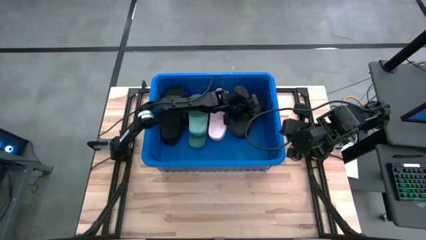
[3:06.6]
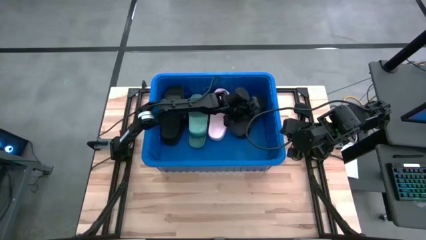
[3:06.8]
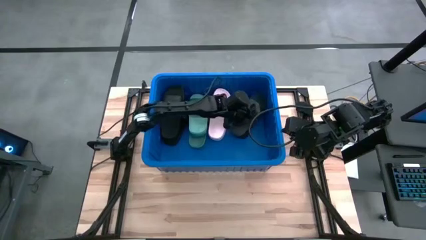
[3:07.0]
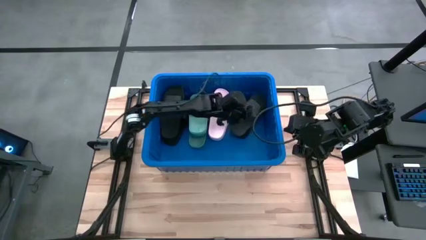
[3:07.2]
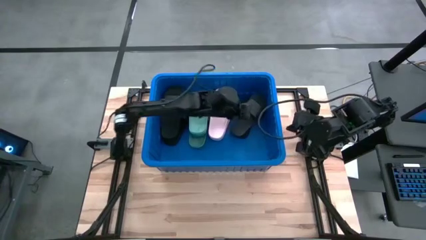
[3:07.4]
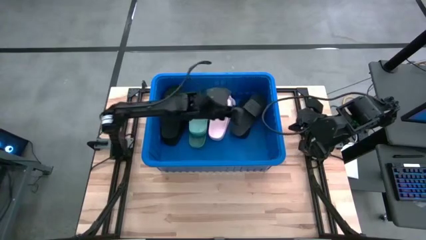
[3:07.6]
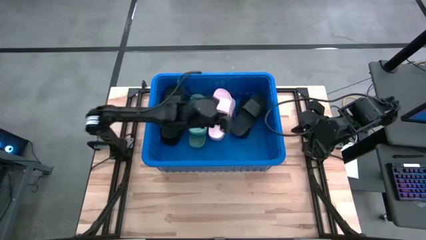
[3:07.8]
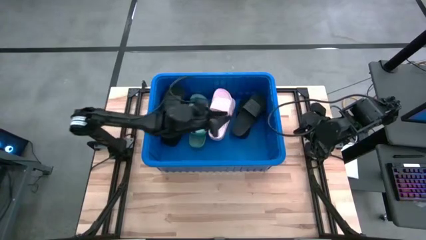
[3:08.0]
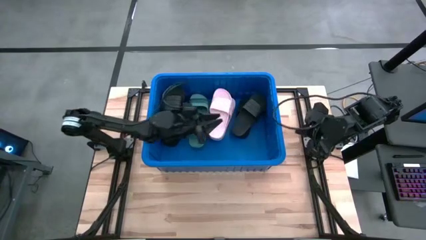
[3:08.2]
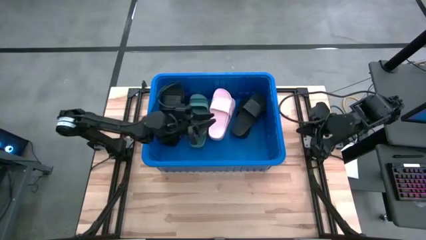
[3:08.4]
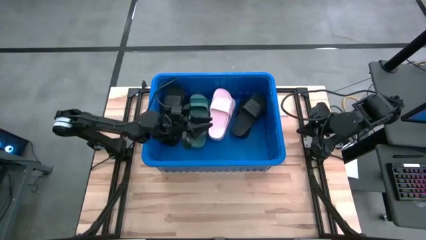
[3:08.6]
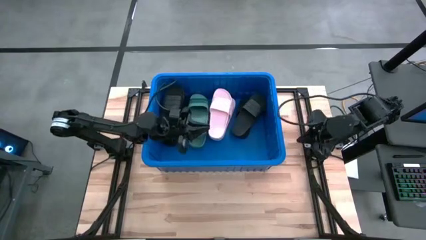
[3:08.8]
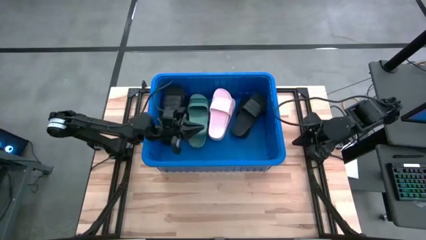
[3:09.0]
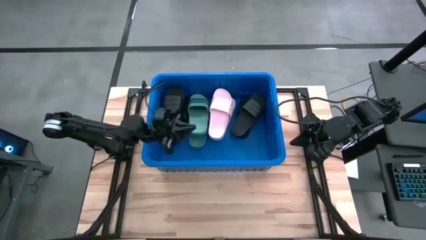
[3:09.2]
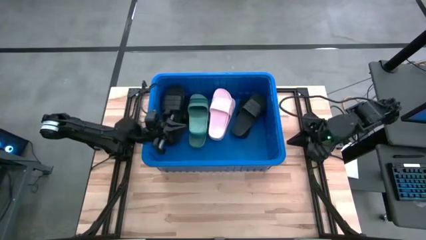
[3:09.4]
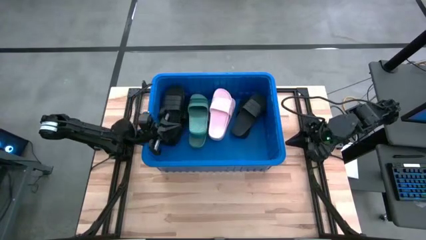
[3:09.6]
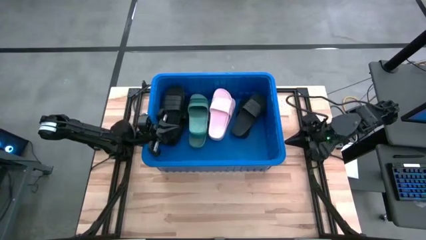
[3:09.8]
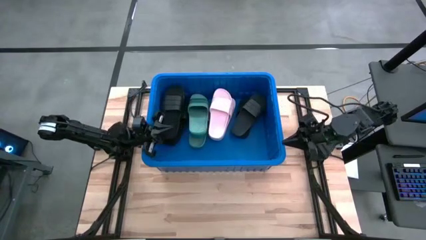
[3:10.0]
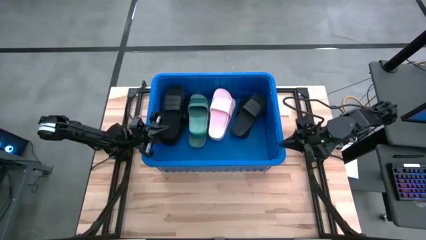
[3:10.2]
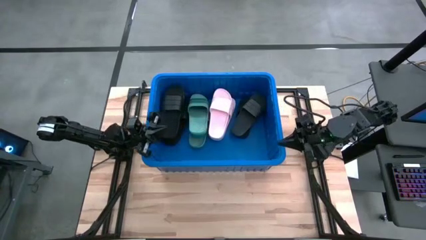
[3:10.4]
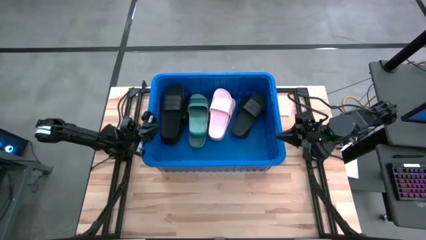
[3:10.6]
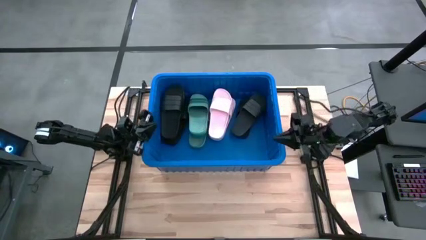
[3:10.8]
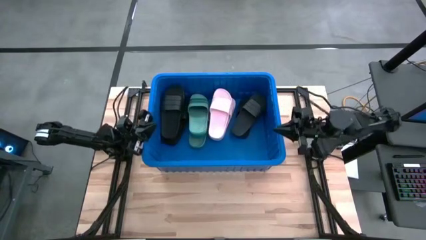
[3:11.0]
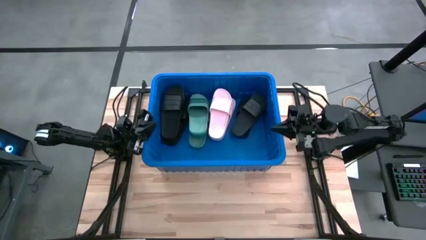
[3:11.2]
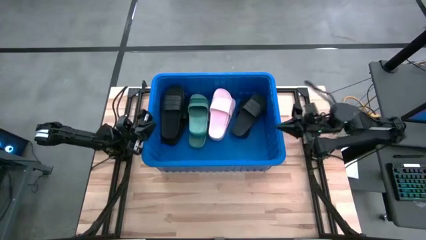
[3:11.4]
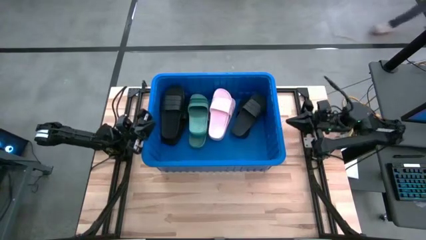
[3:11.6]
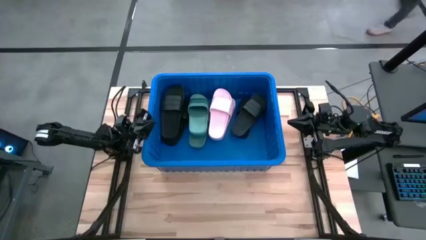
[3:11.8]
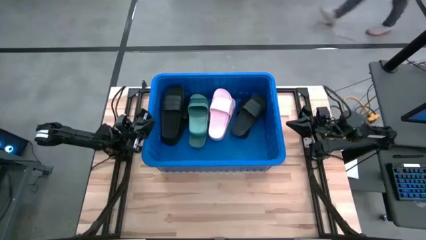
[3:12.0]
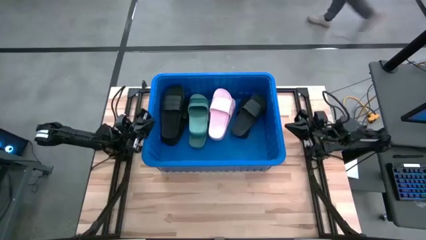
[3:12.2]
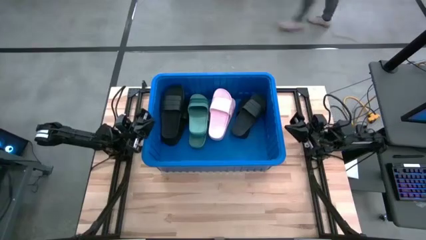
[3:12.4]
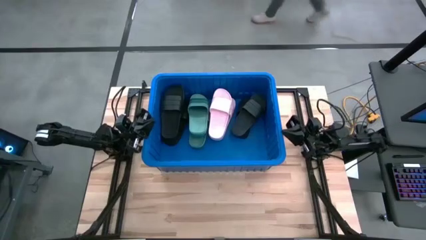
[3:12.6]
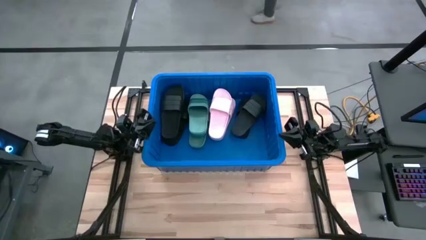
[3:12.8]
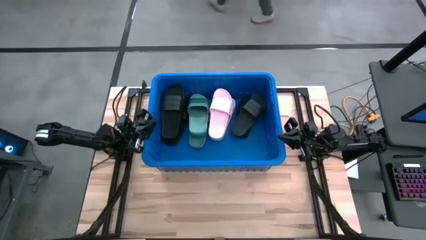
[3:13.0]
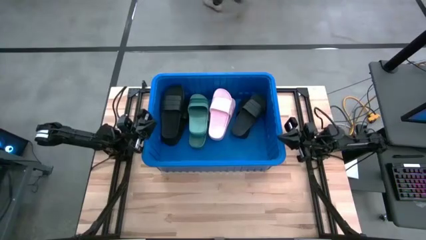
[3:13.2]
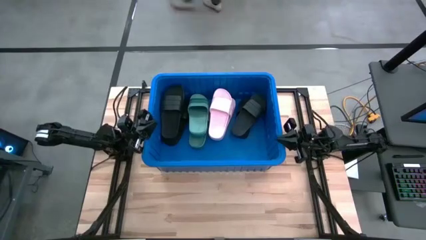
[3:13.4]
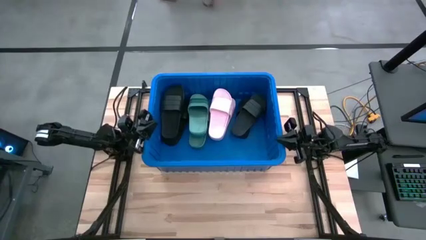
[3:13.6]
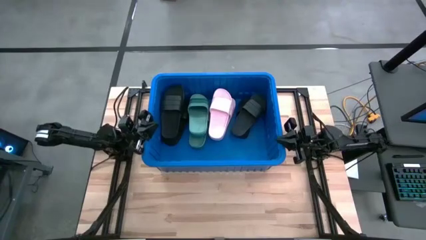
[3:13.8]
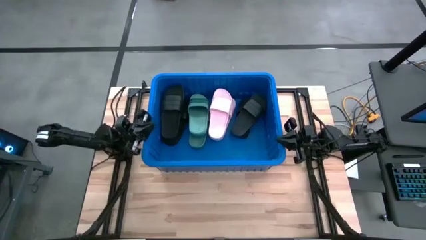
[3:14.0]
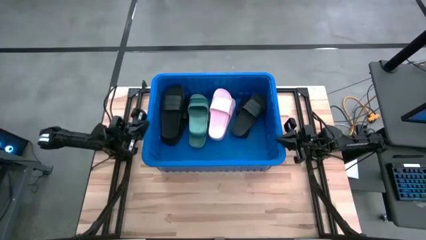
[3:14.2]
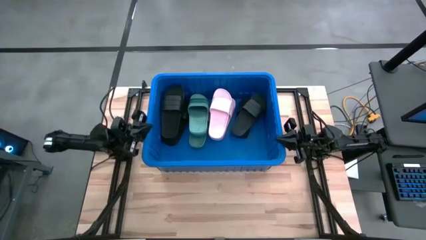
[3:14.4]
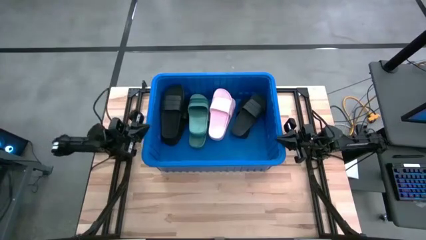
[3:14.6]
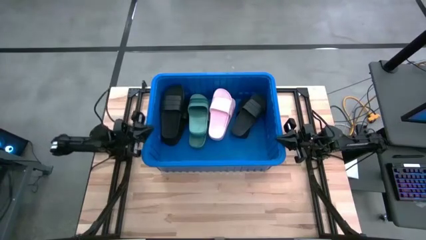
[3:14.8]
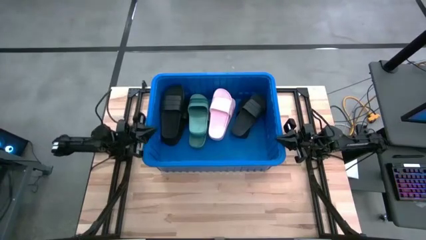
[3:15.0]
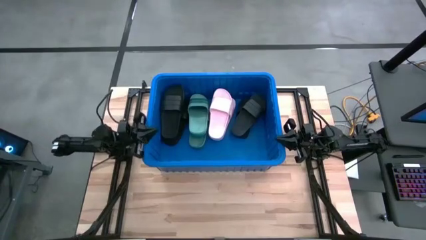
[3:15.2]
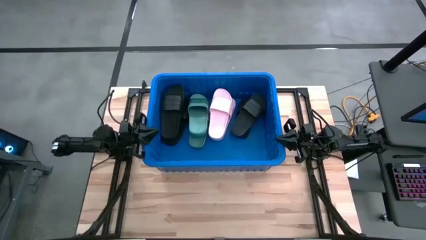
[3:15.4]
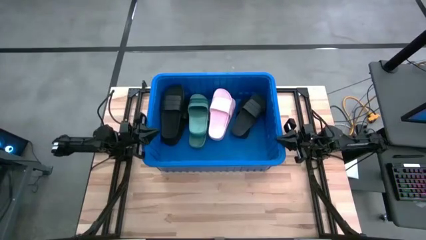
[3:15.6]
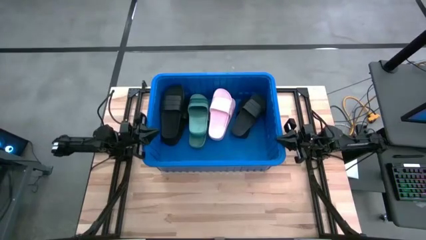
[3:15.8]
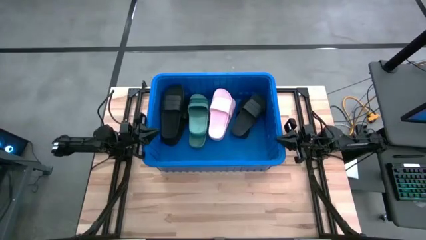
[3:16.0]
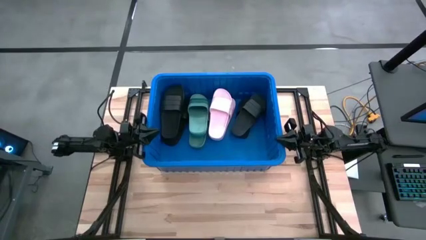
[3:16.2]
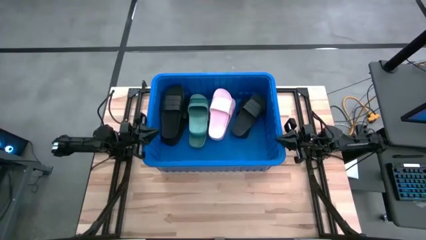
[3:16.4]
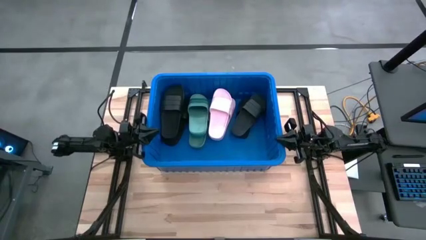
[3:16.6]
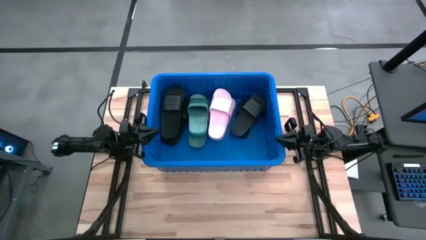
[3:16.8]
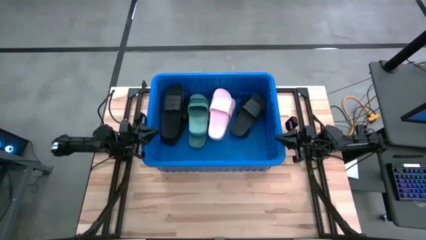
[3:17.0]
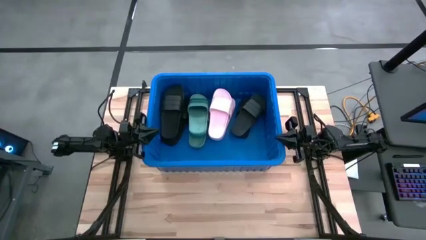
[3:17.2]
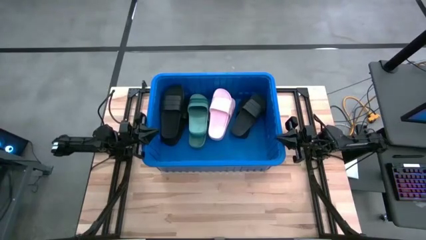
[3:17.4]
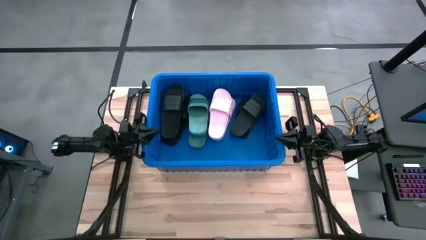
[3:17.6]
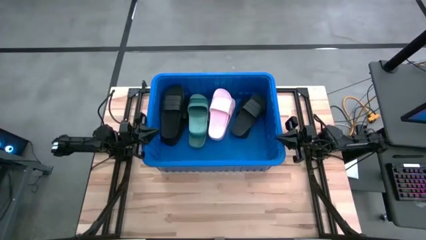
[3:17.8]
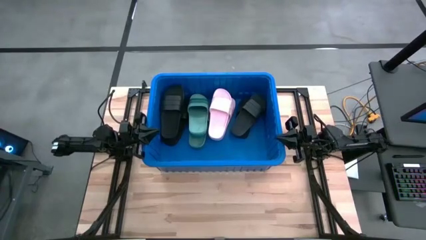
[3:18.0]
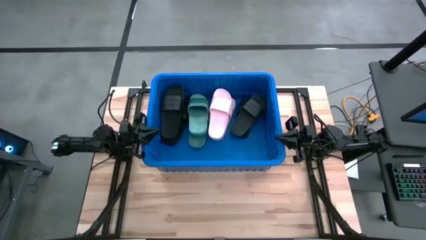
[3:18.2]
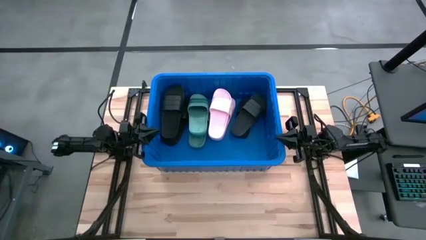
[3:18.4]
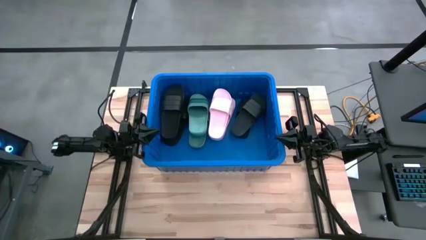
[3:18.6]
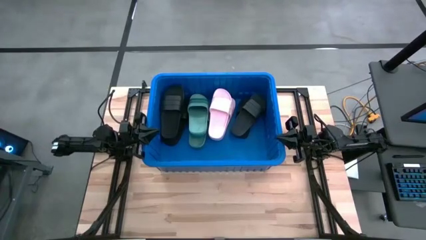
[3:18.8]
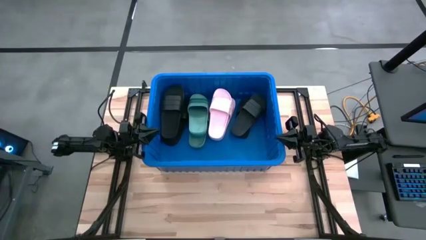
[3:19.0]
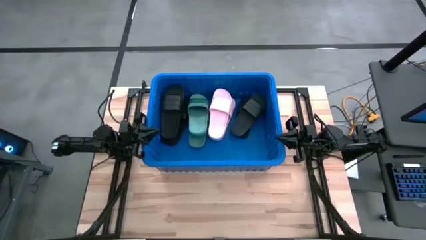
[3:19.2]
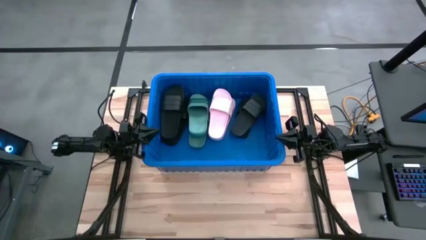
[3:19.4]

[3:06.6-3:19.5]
Task: Pick and place slides into bin
Return to Home Position

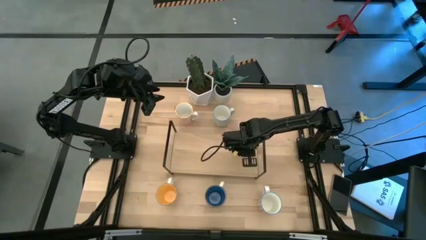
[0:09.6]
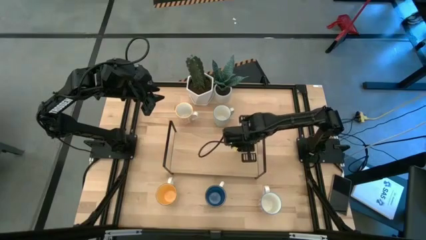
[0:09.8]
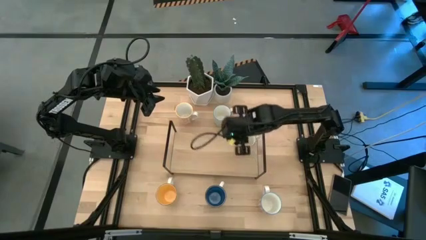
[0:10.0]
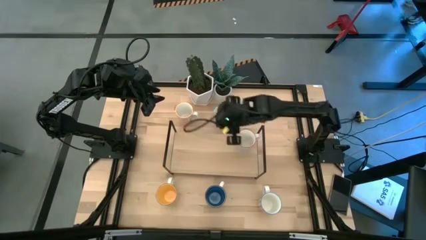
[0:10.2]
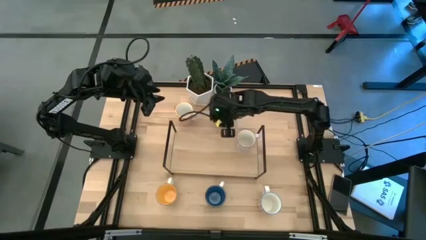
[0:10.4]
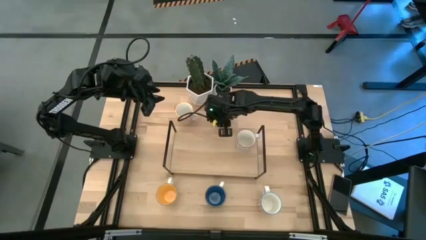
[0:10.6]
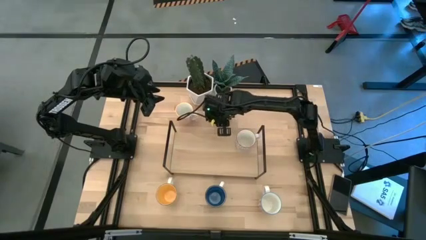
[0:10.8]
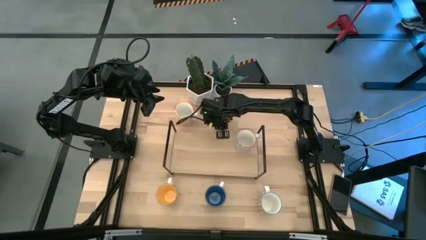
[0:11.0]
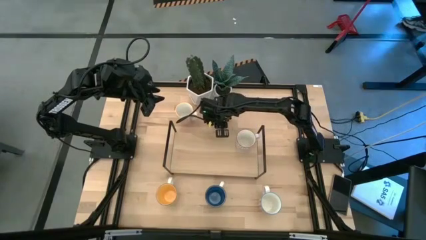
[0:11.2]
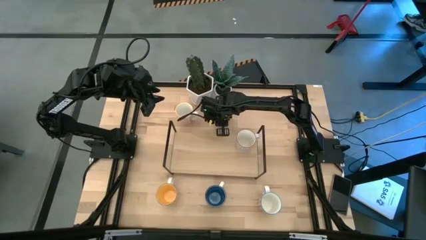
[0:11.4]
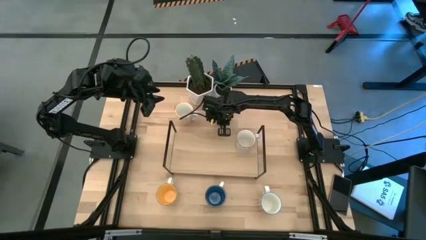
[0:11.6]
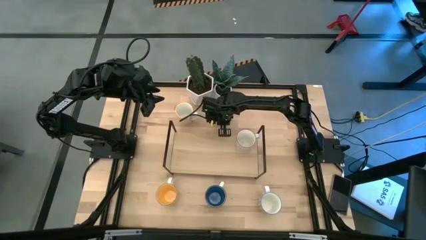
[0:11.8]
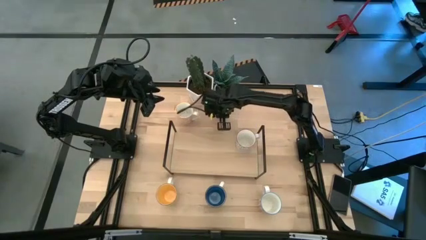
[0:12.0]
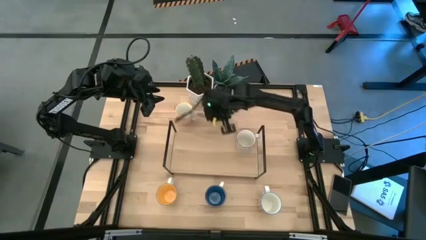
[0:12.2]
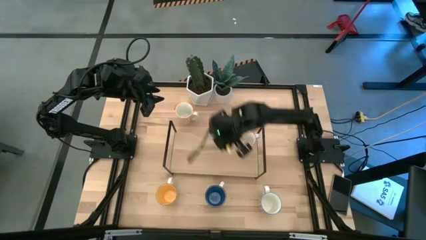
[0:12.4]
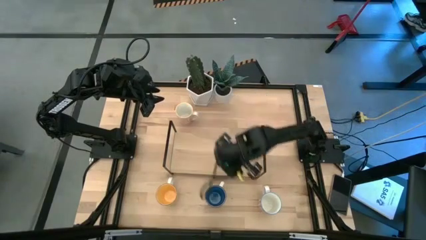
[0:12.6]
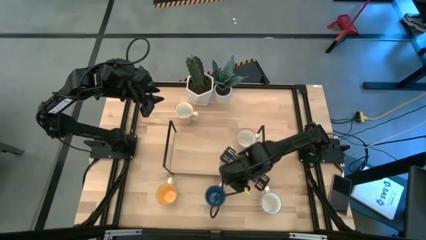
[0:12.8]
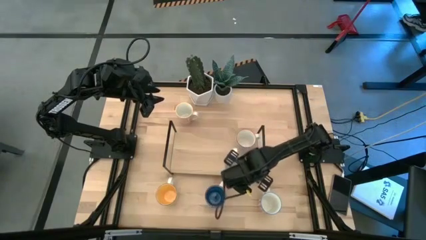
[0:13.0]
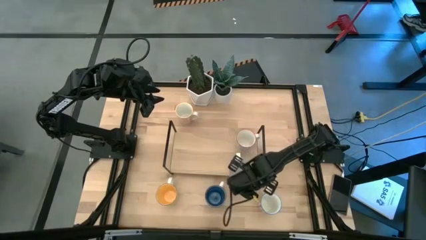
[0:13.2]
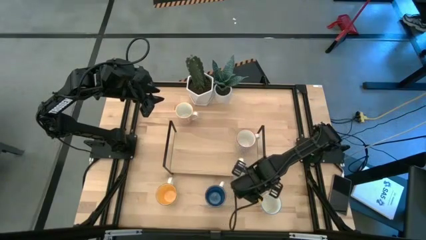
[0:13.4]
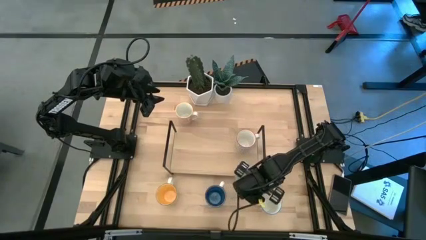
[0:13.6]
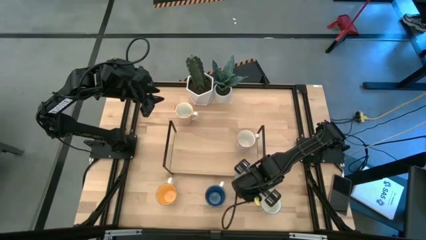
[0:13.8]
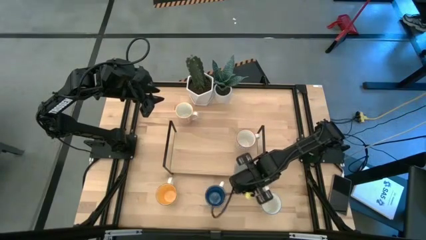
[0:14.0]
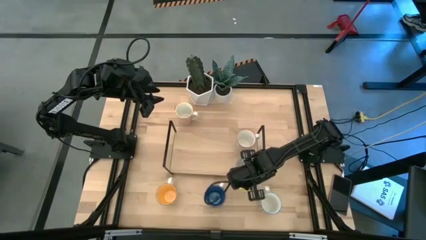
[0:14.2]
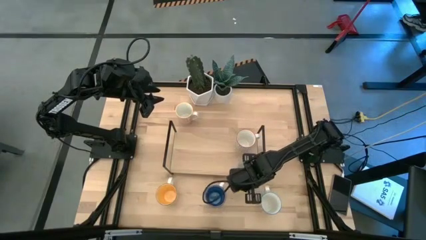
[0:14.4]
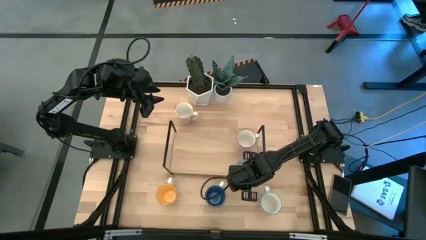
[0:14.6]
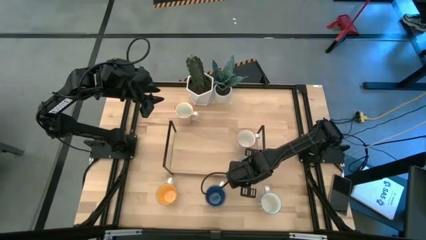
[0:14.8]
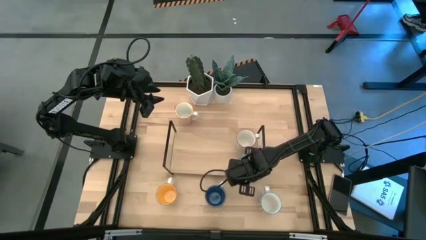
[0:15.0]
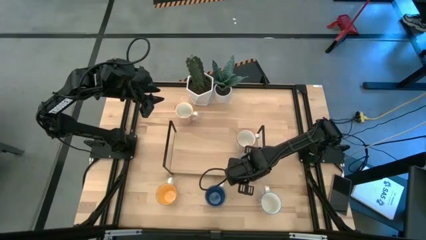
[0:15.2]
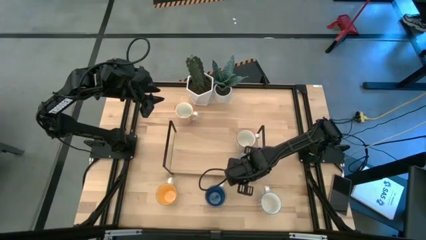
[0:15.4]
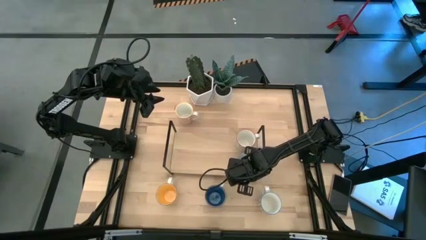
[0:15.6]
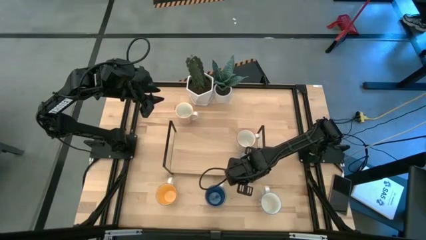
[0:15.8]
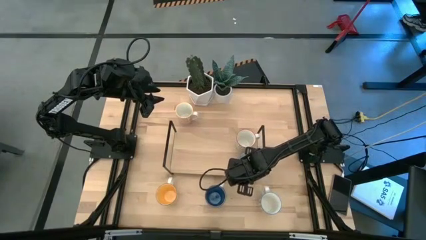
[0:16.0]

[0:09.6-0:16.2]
Task: Place coffee mugs
Put the white-blue mug on the shelf
